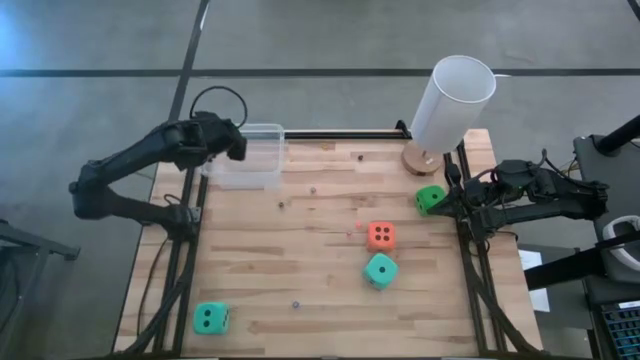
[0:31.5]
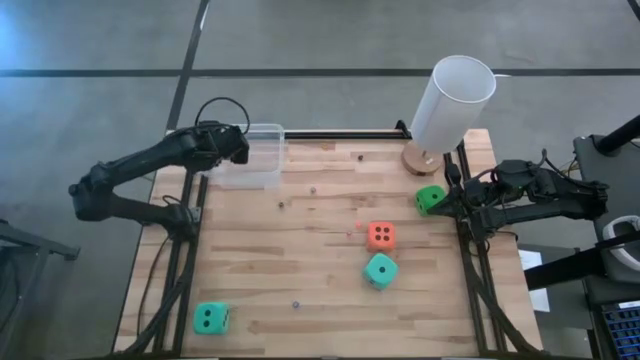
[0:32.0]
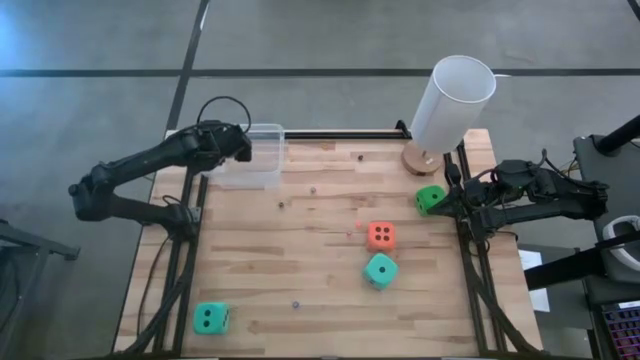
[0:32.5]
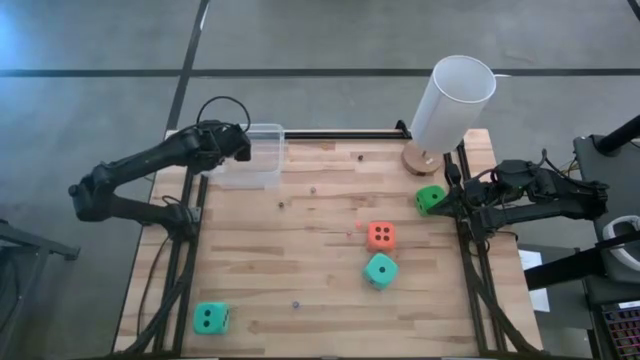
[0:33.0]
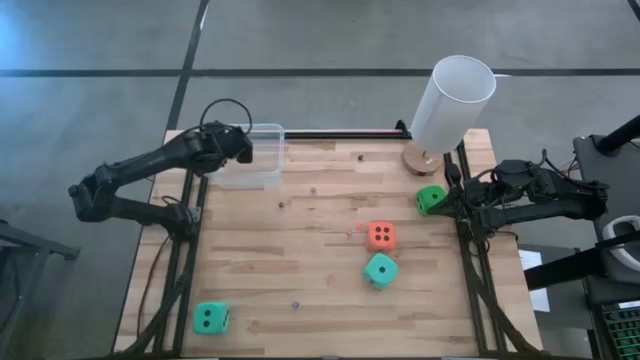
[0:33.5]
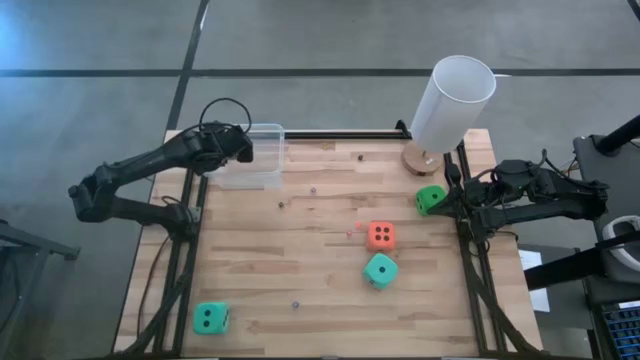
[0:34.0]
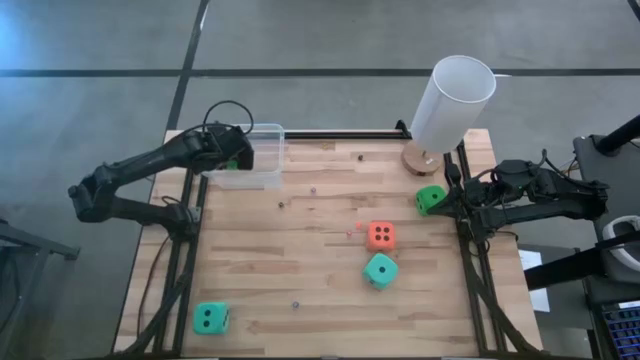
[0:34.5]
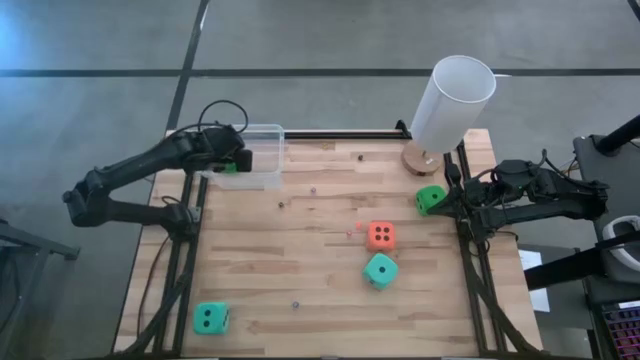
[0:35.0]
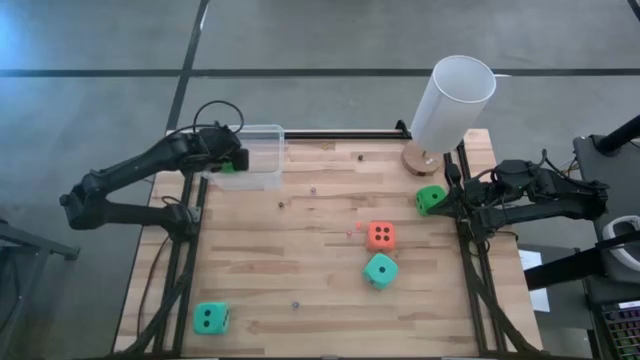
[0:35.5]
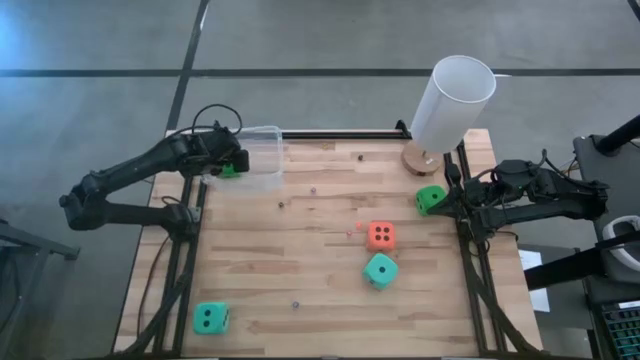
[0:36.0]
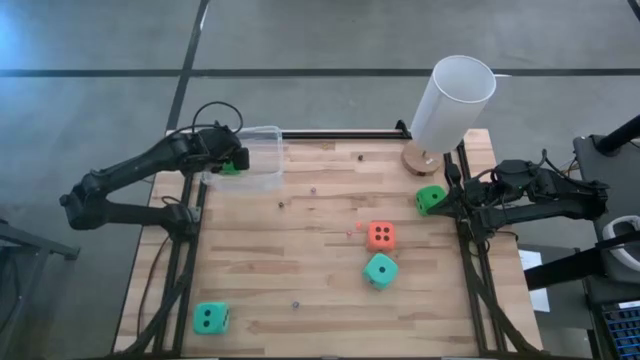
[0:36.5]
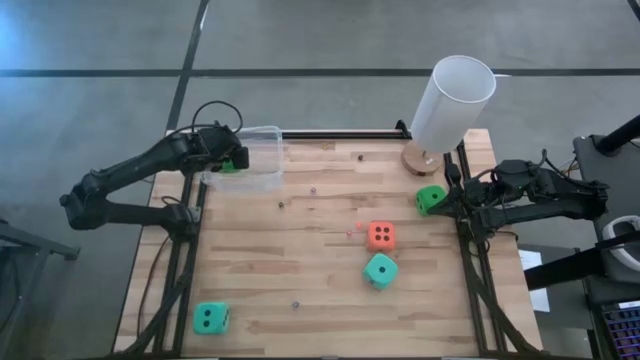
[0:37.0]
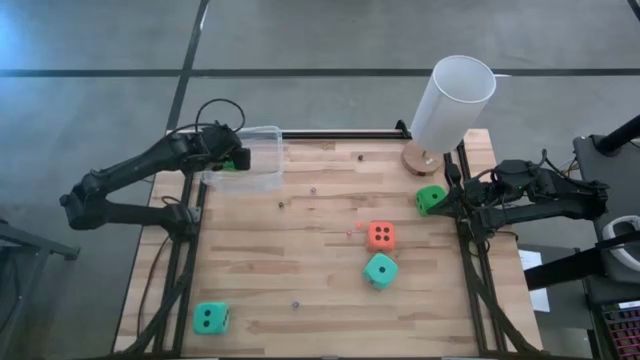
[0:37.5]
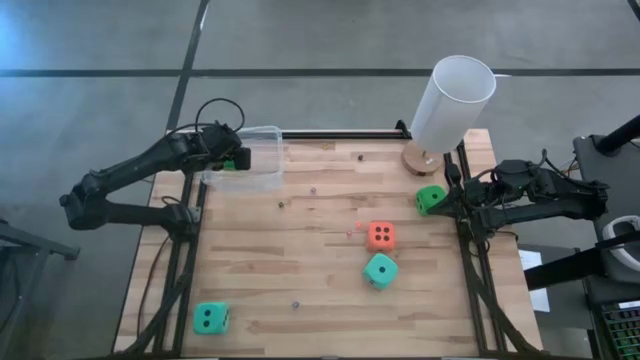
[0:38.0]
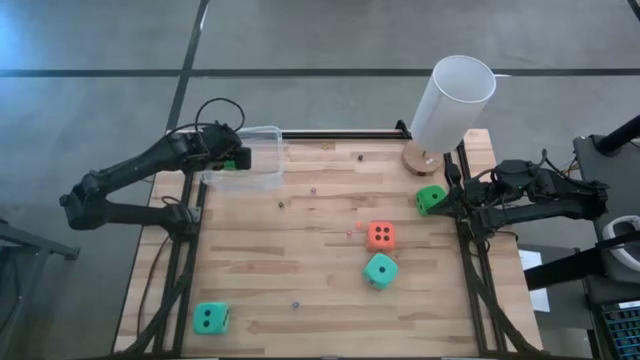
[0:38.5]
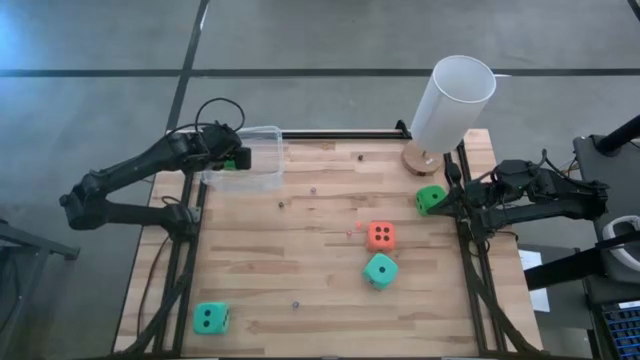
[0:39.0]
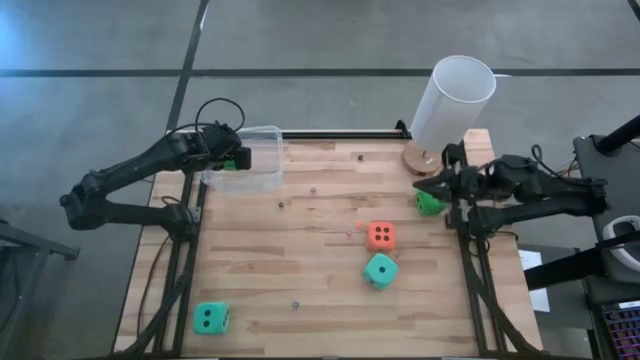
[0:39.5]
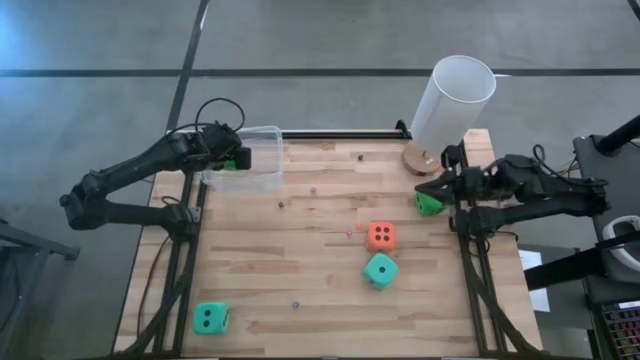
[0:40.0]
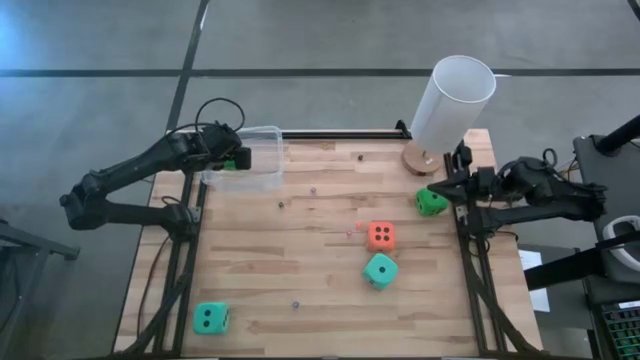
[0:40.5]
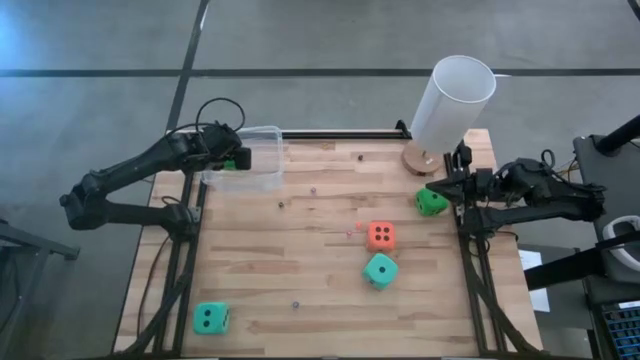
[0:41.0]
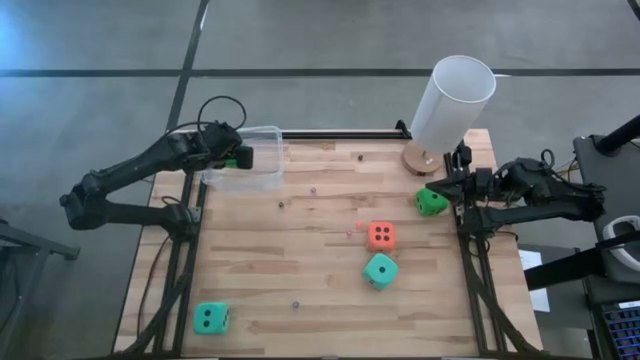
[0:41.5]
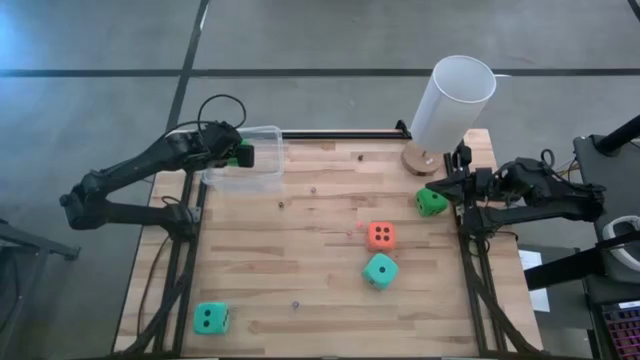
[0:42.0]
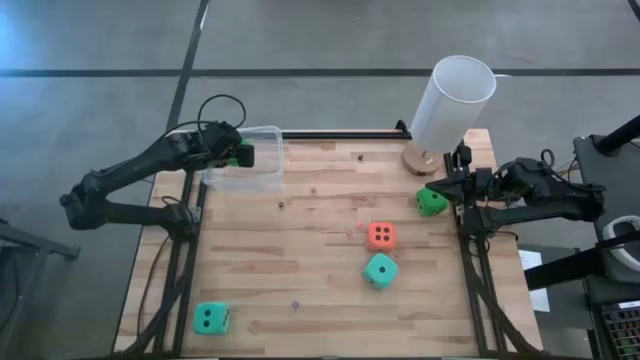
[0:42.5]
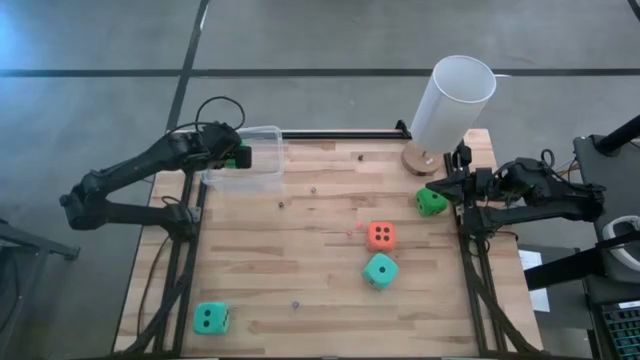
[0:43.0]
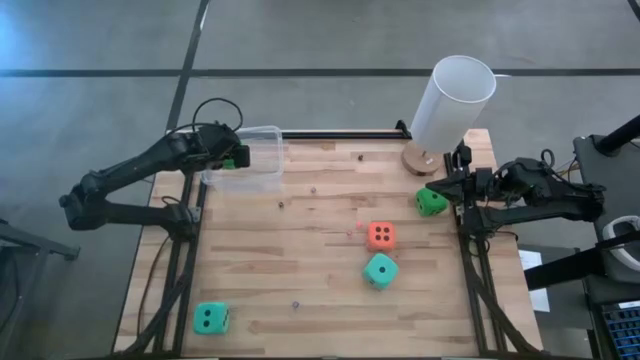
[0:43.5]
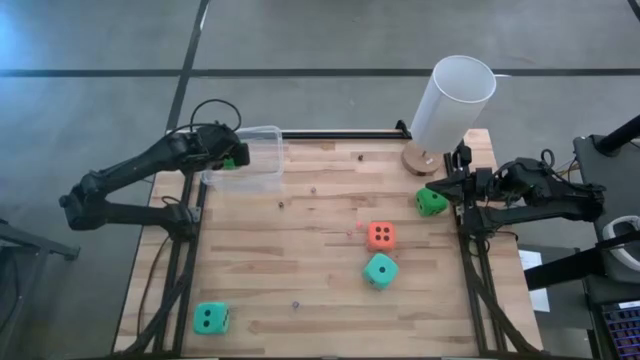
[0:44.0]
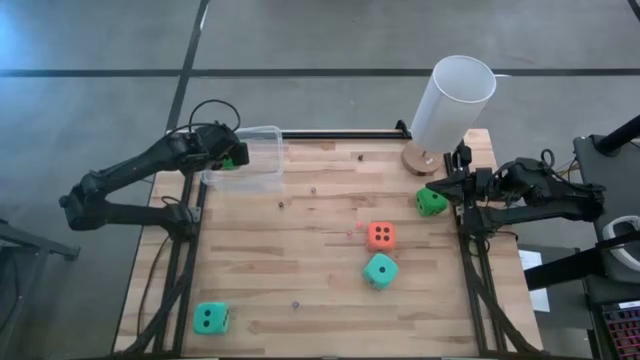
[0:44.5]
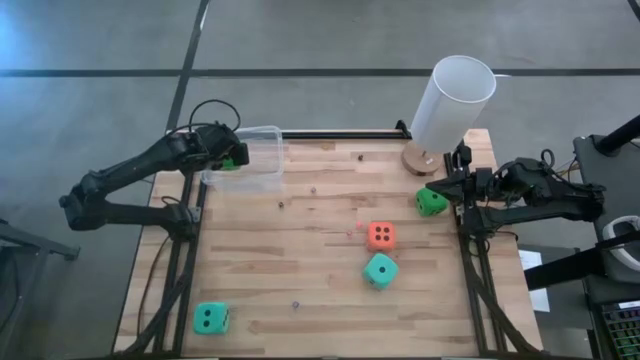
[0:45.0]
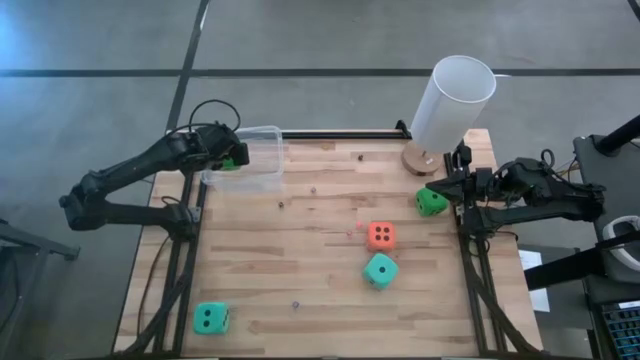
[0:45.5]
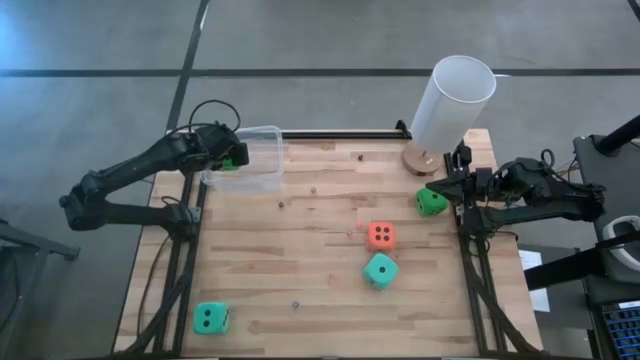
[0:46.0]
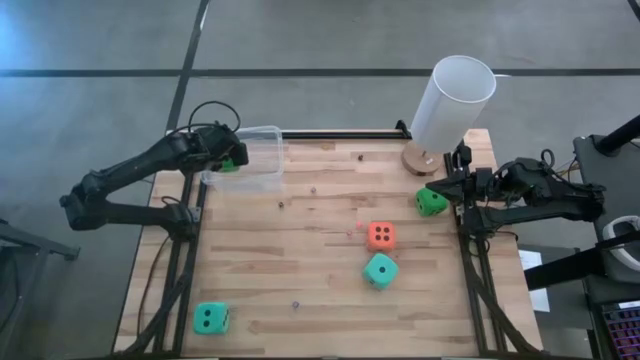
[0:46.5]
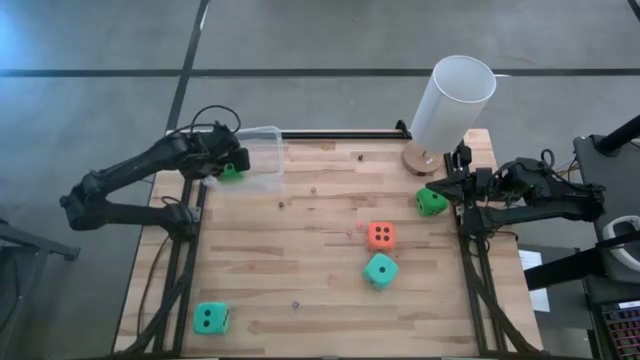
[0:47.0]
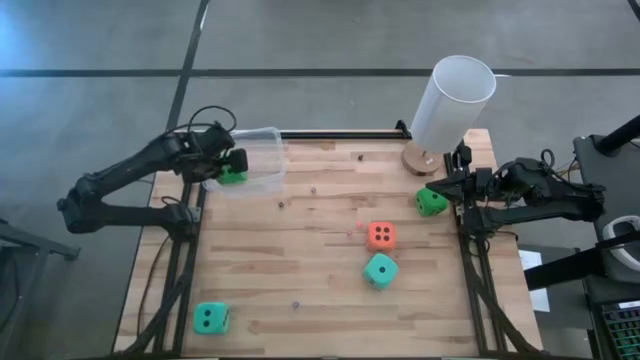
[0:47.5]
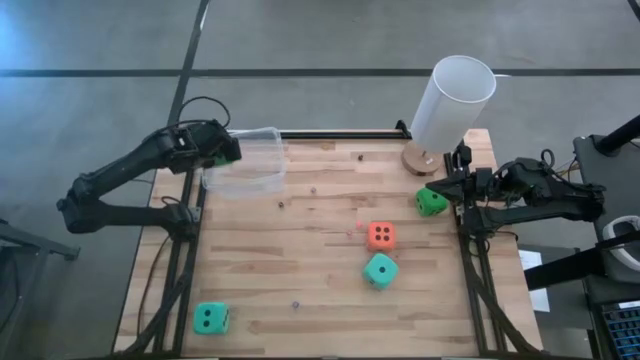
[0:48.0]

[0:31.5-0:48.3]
Task: Pick & Place Dice
Put the left green large dice into the transparent bin

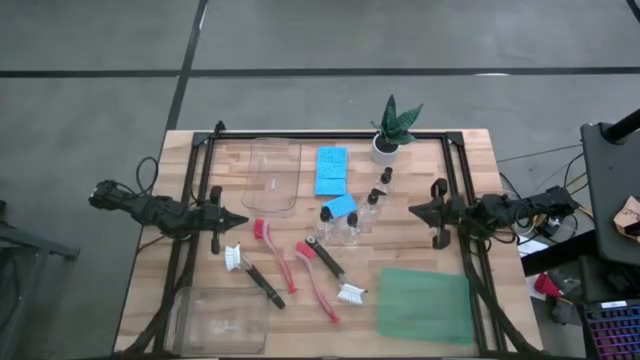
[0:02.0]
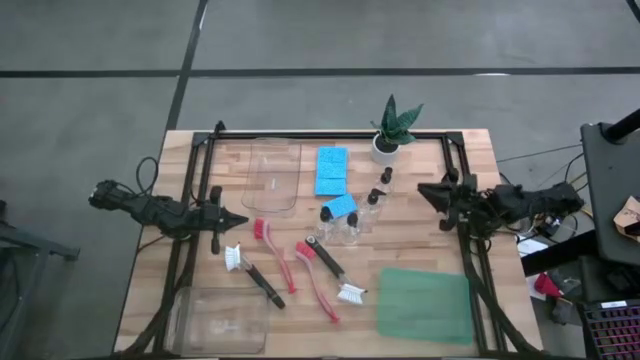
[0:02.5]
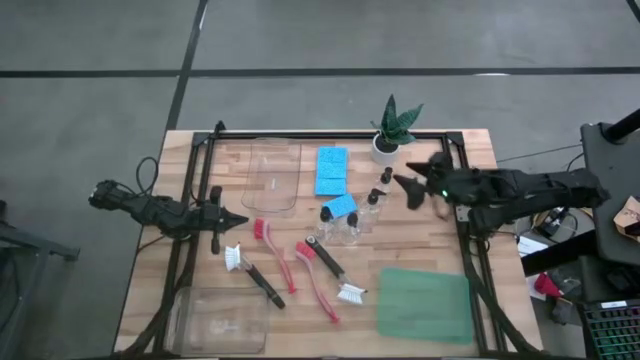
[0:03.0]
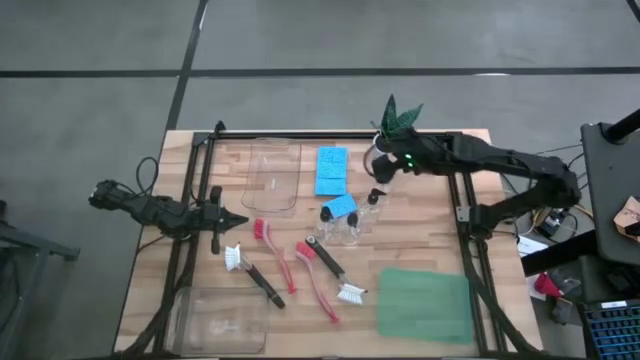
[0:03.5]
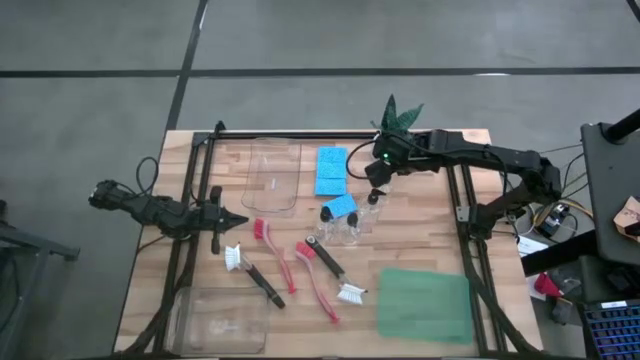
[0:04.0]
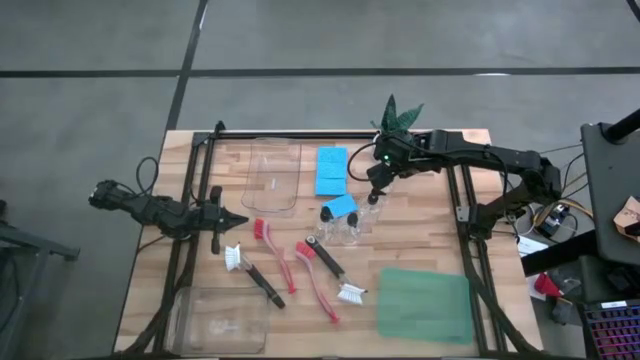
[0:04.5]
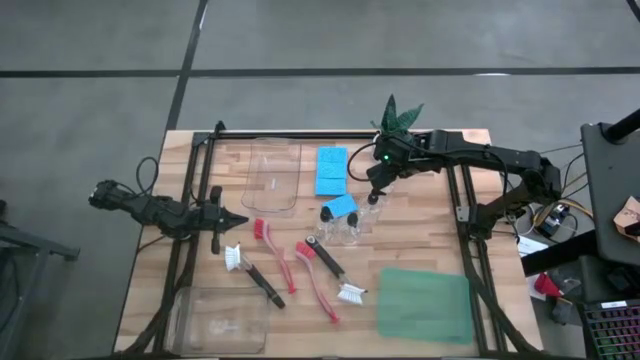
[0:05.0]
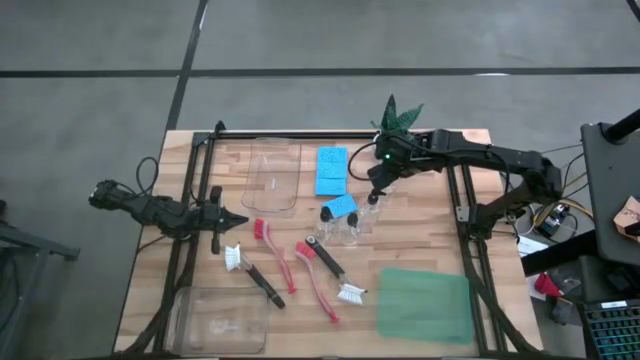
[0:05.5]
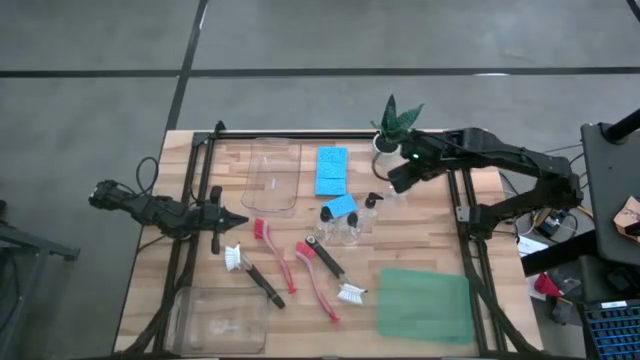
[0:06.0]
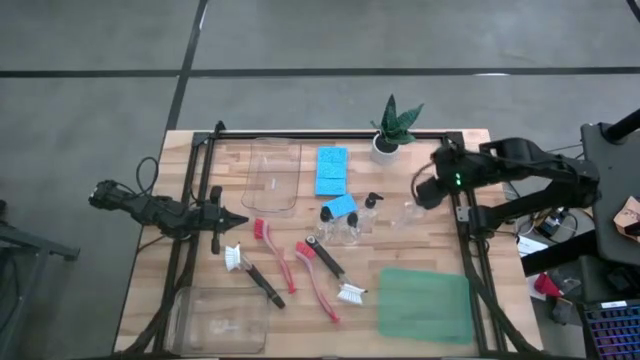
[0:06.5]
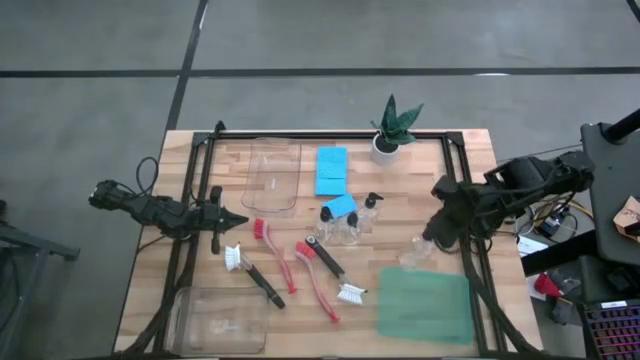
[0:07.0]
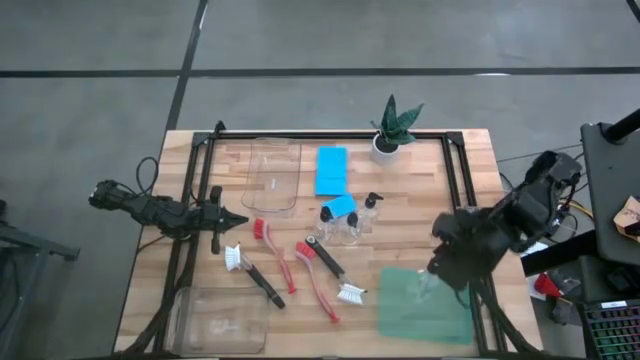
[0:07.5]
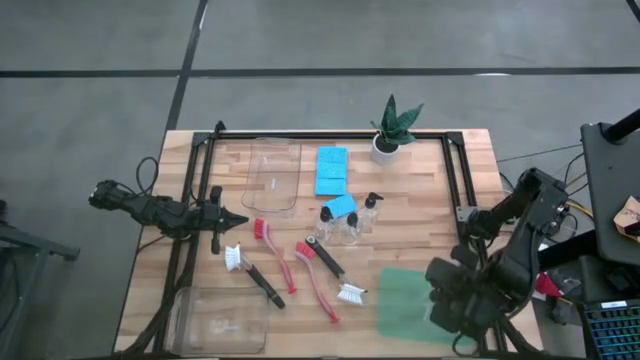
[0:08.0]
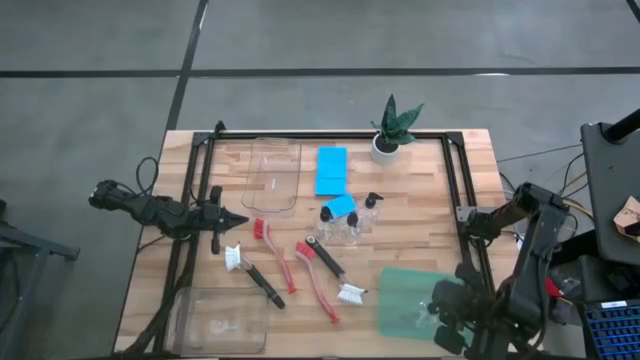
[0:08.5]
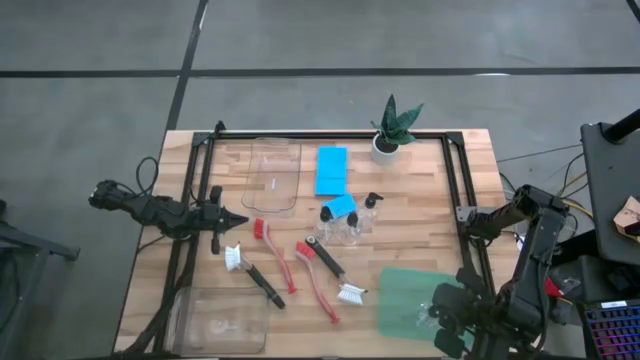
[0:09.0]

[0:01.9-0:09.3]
Task: Pick & Place Kitchen Sink Supplies
Put the spray bottle into the green bin
